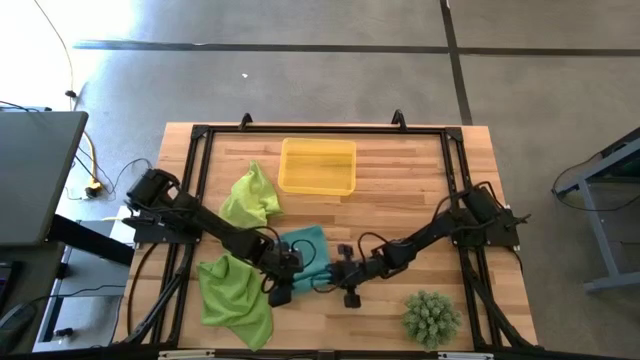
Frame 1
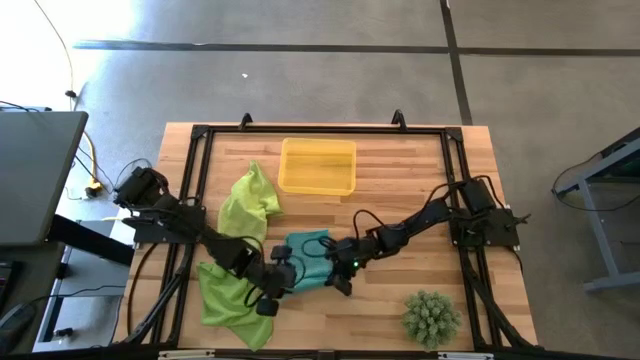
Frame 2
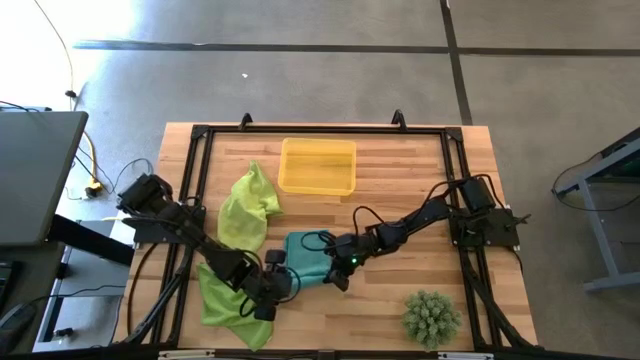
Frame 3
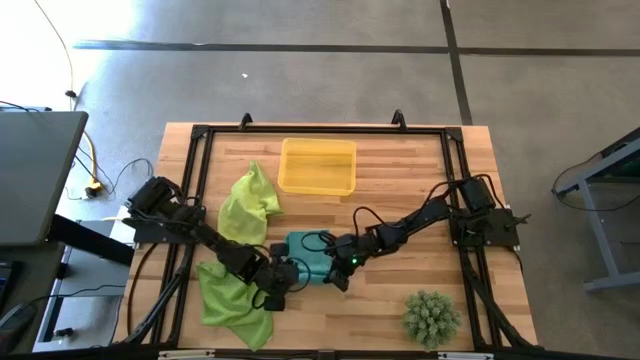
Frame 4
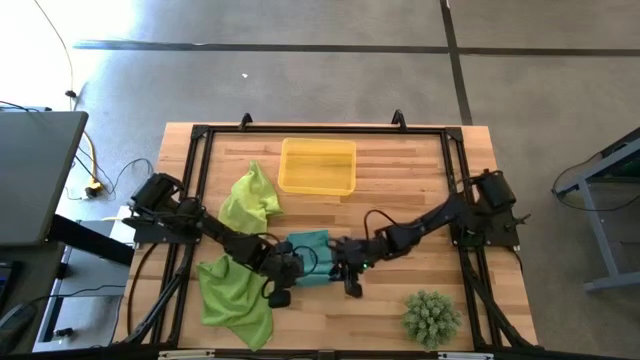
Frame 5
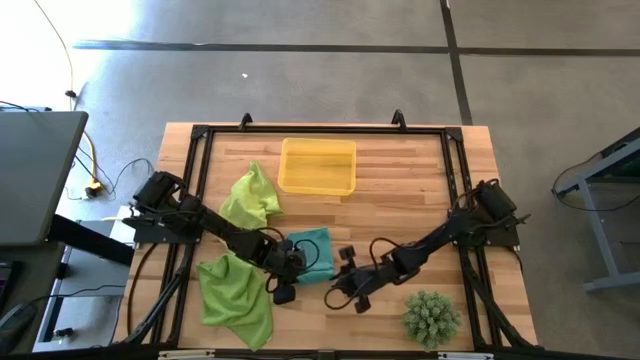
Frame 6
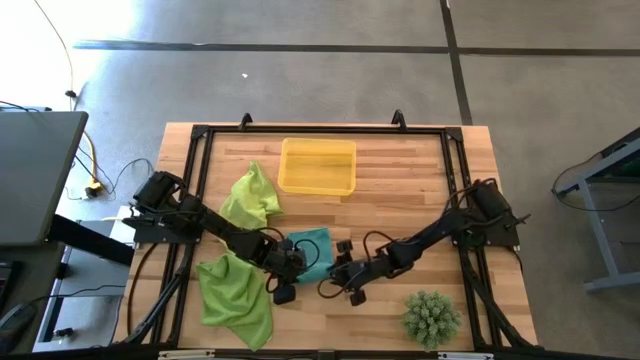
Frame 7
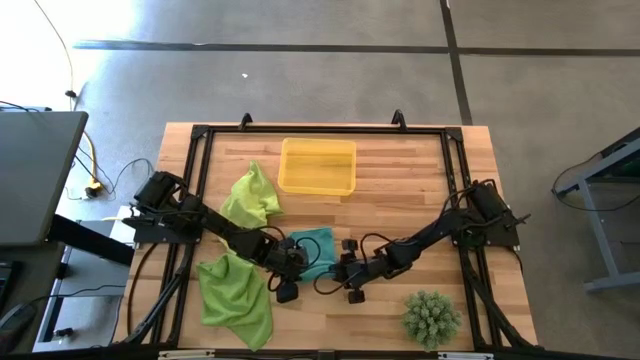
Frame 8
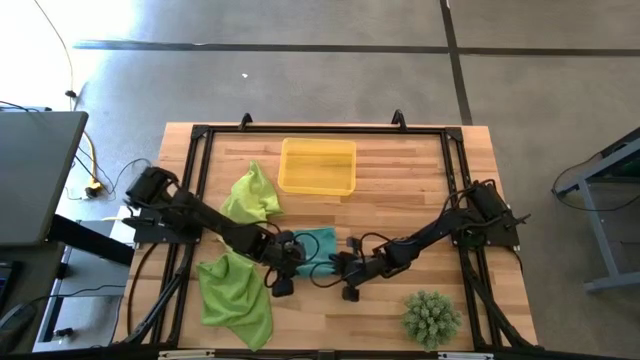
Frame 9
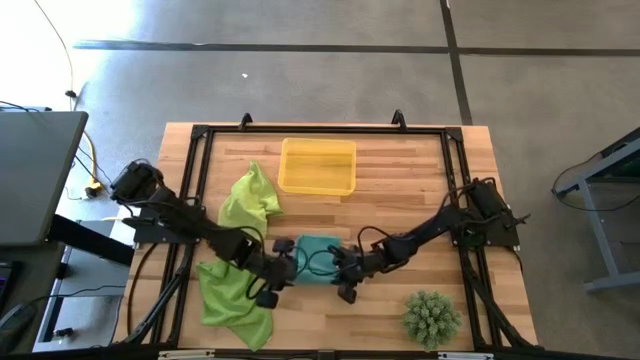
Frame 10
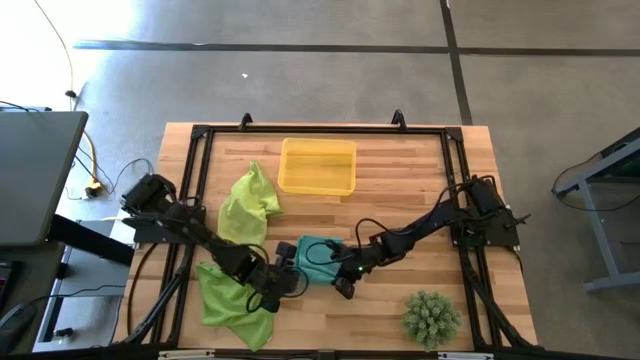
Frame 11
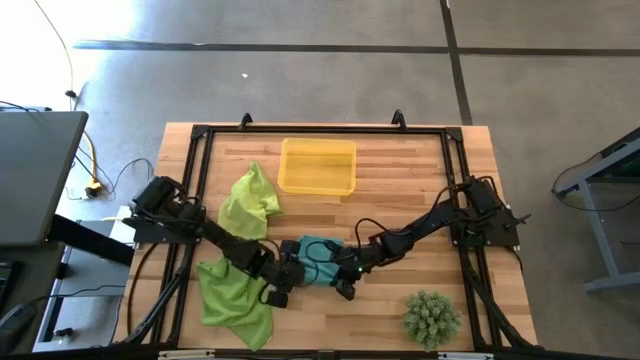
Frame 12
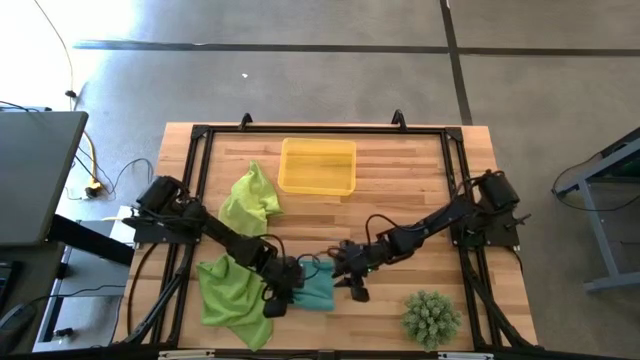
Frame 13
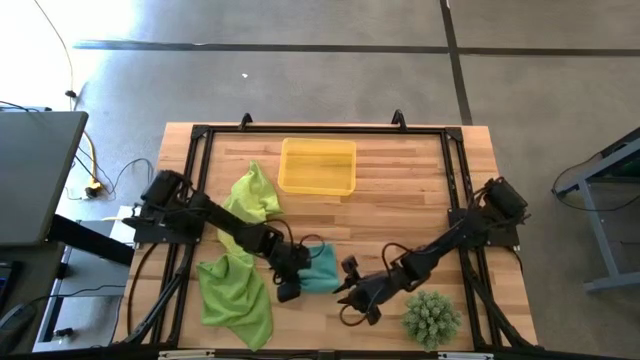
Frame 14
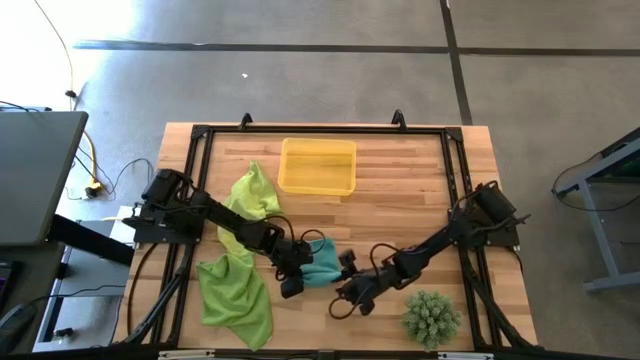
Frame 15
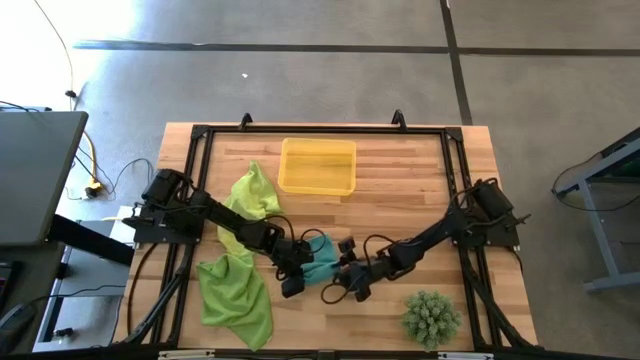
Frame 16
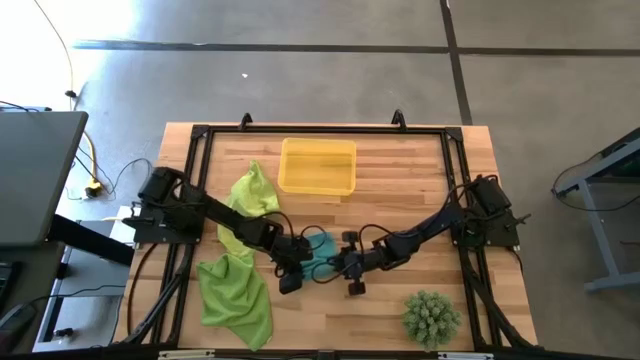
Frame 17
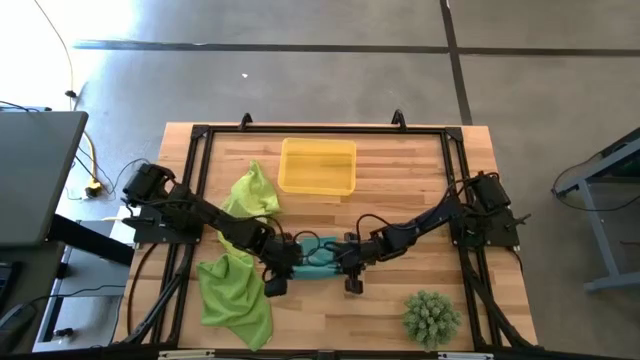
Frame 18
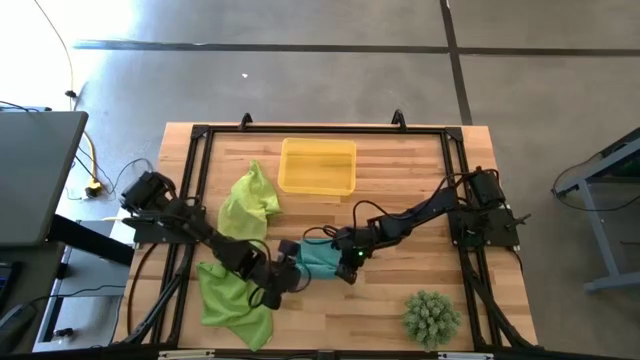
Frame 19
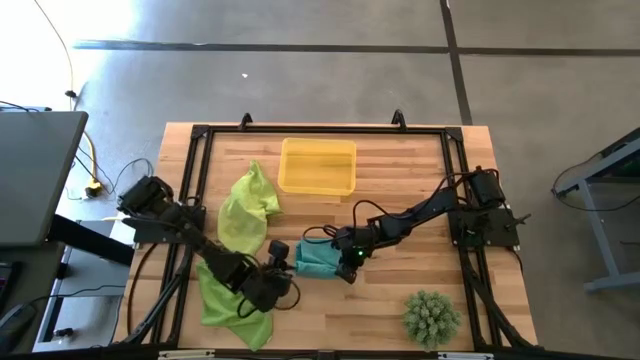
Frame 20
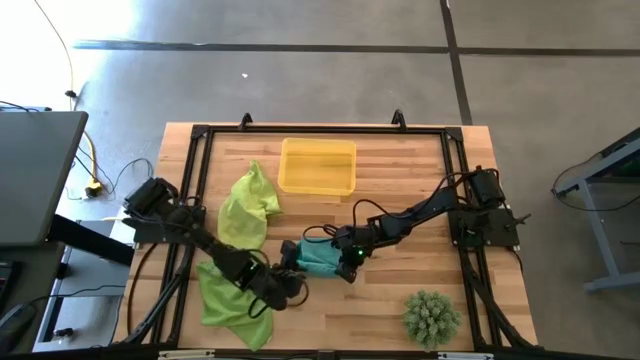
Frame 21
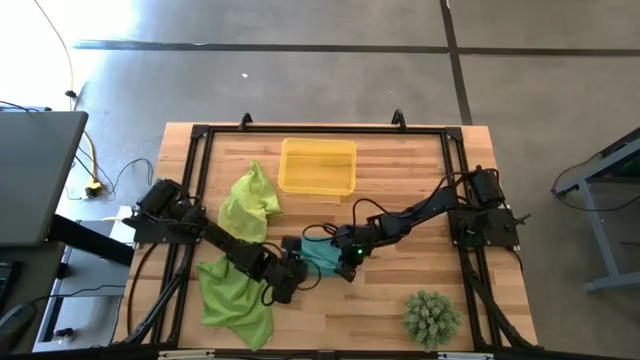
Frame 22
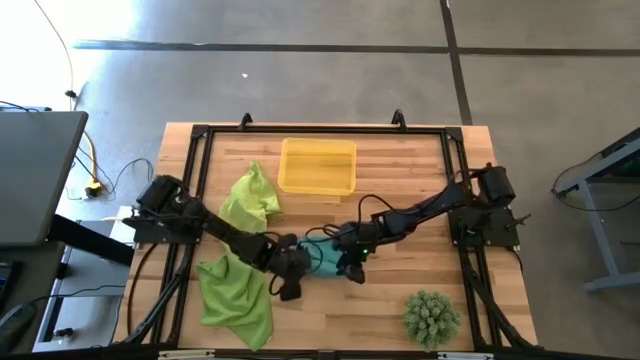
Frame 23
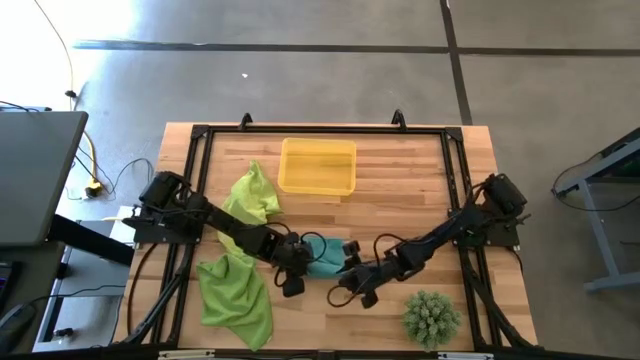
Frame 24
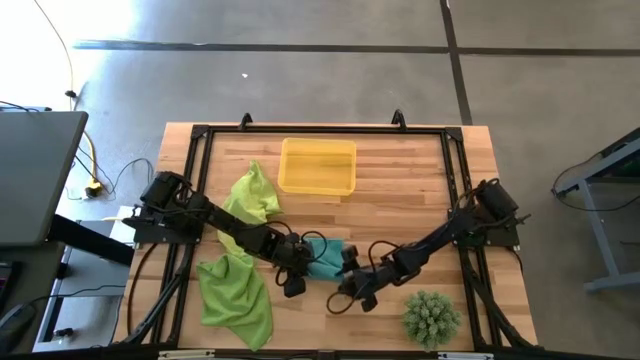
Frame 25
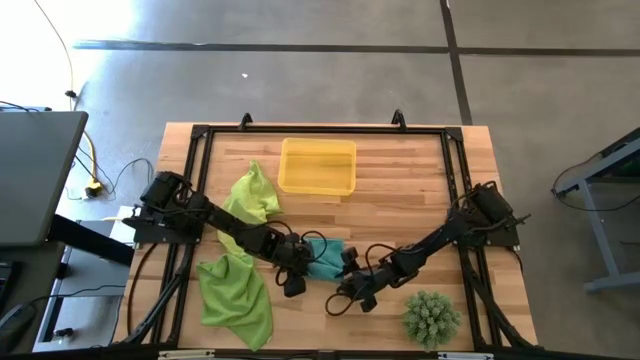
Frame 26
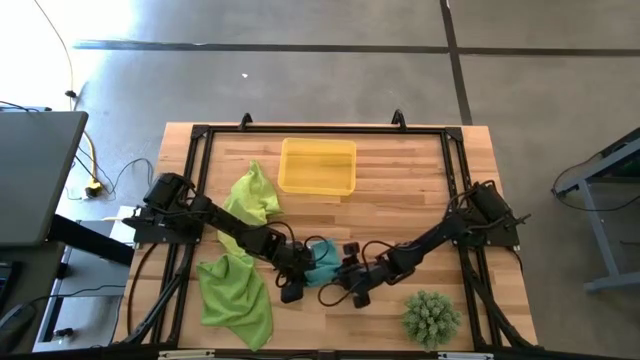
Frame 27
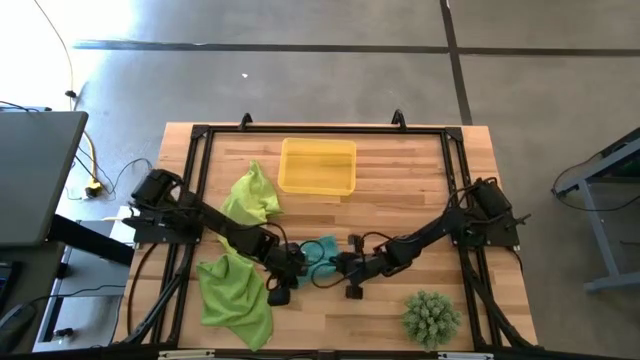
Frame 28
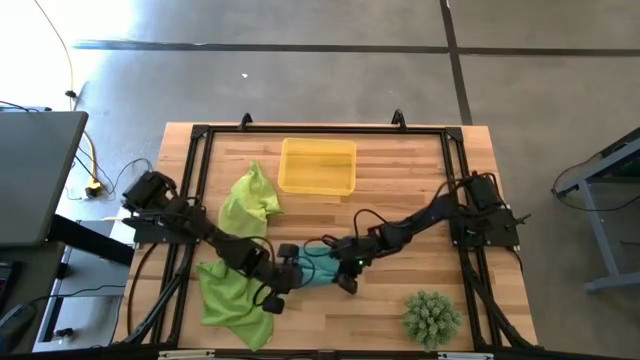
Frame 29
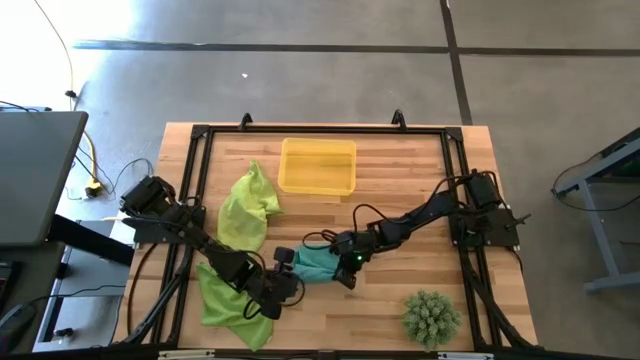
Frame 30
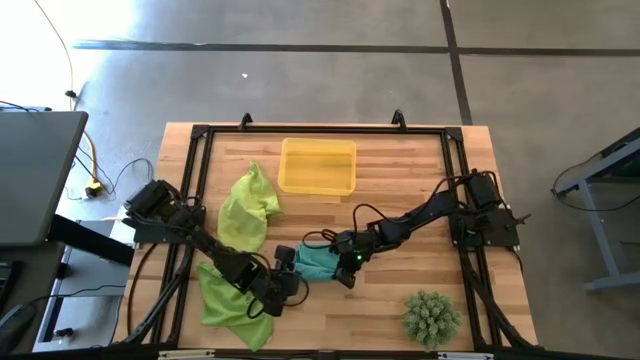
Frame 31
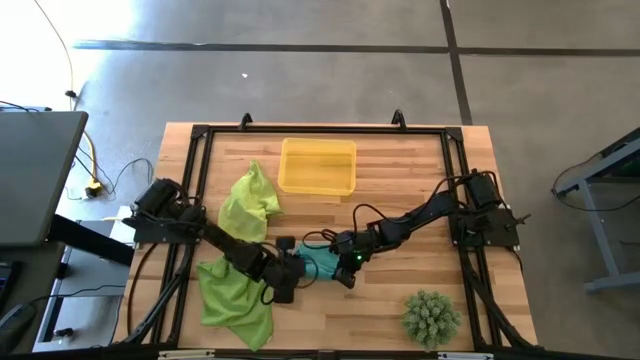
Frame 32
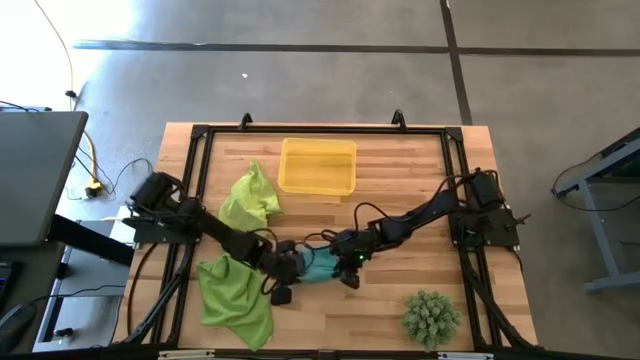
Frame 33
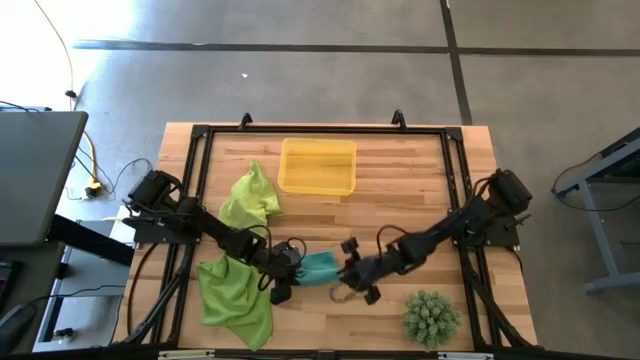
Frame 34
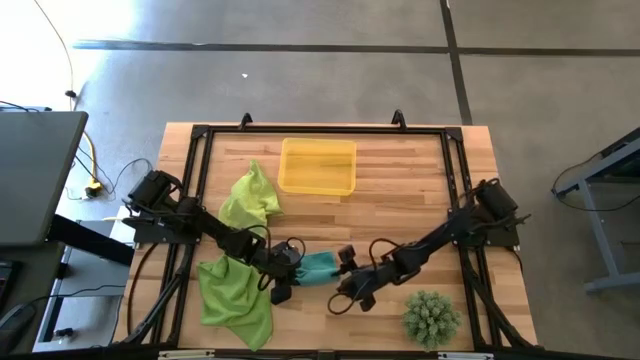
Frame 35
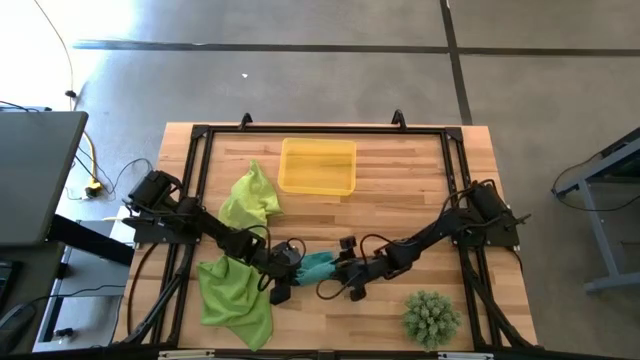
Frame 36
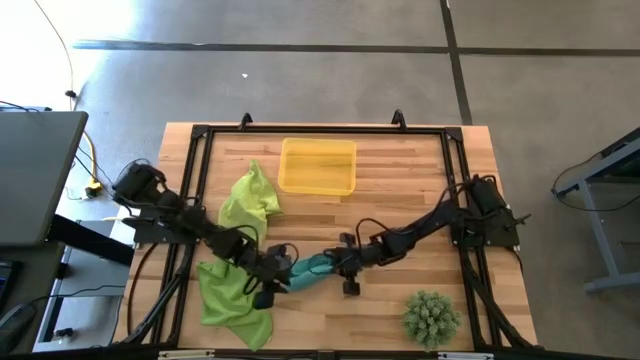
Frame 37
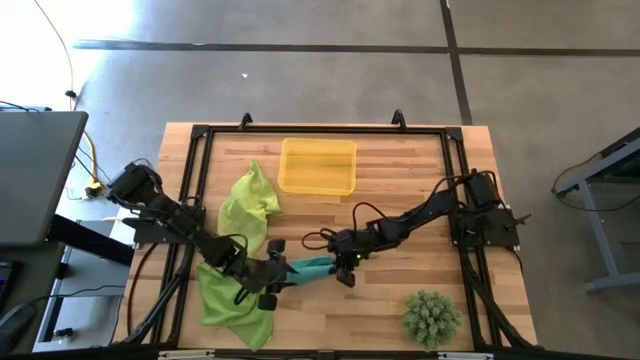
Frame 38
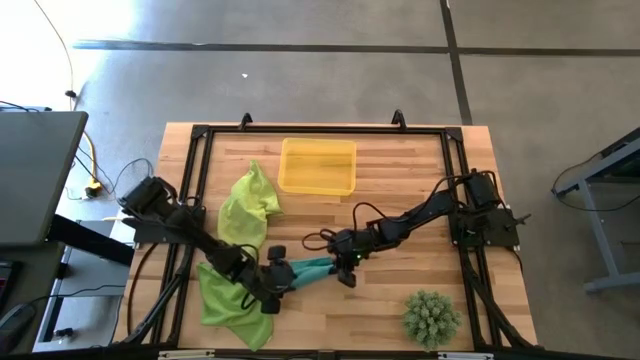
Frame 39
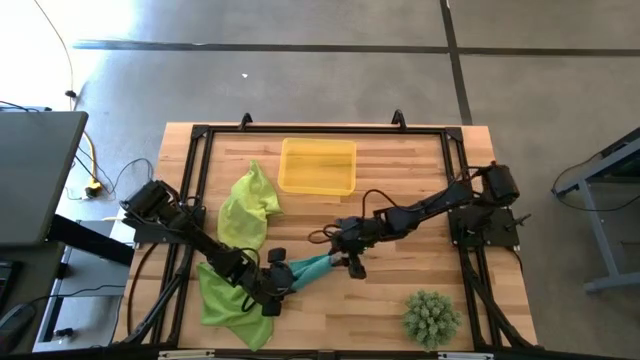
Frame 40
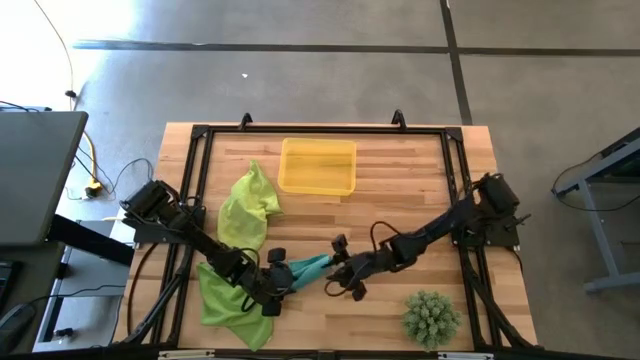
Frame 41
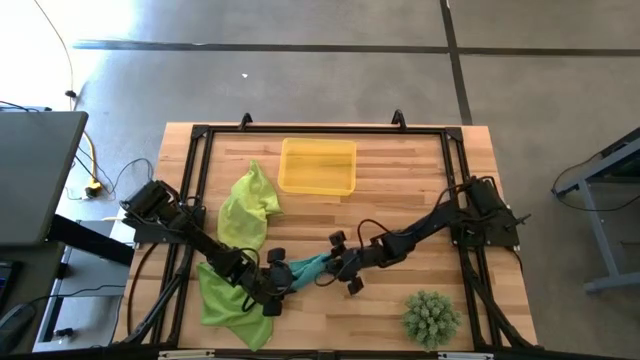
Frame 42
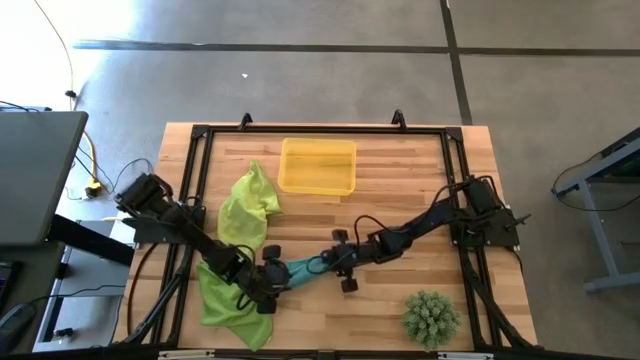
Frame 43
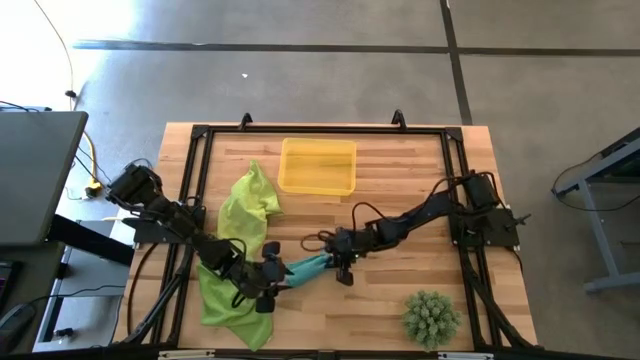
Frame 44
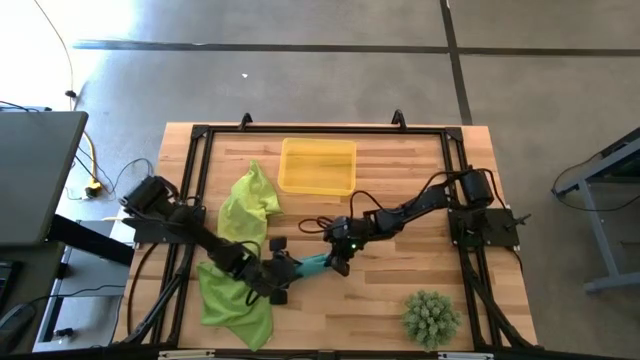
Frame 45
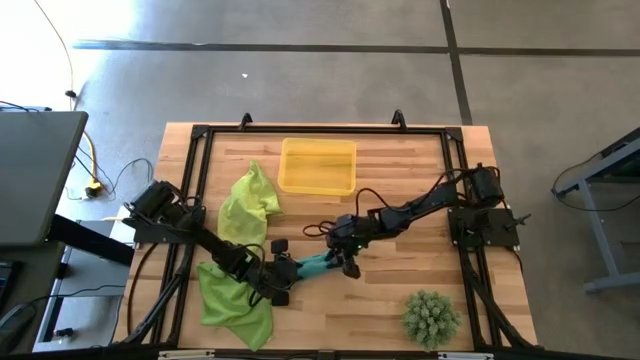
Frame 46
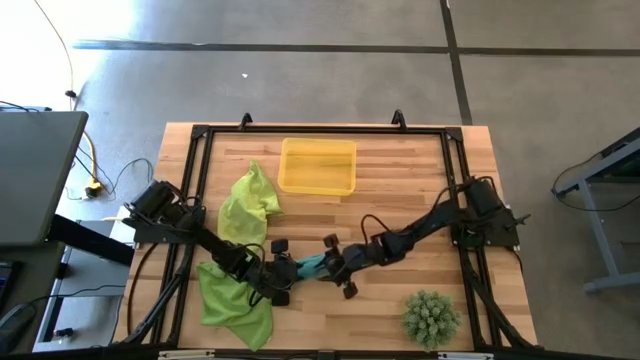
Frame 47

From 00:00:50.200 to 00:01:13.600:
Task: Roll microfiber towels into tight, uniform cylinder then place into a basket
Roll the blue microfiber towel
